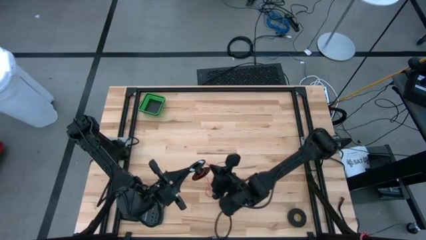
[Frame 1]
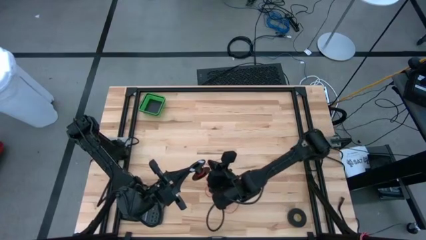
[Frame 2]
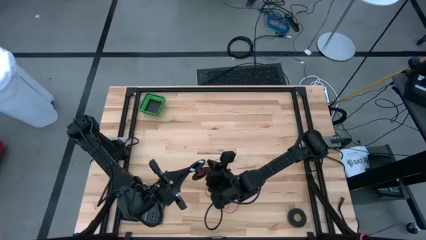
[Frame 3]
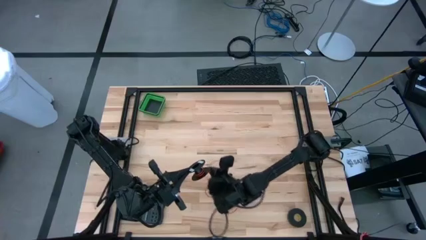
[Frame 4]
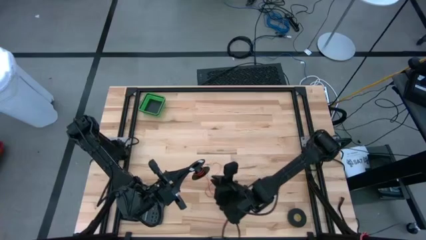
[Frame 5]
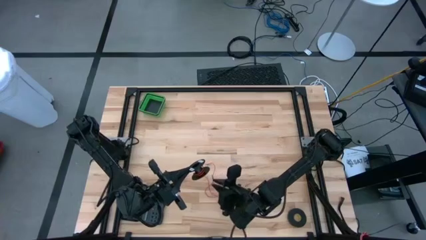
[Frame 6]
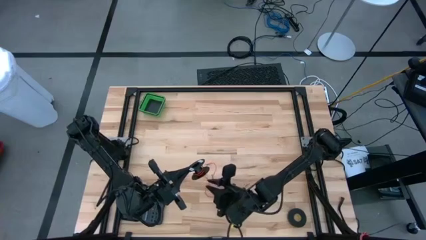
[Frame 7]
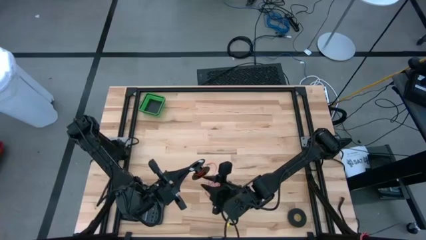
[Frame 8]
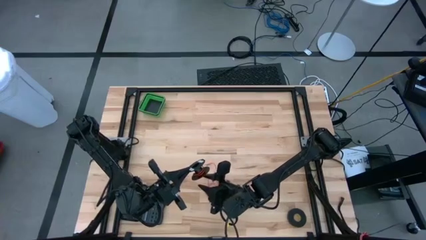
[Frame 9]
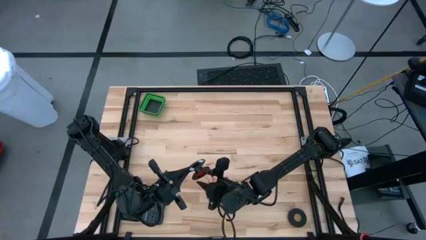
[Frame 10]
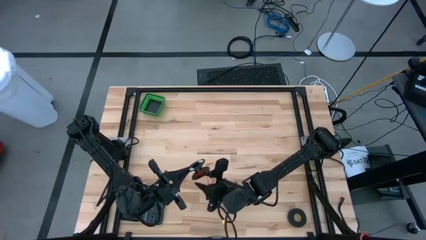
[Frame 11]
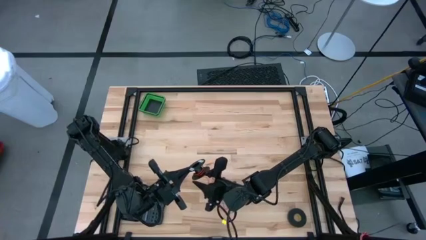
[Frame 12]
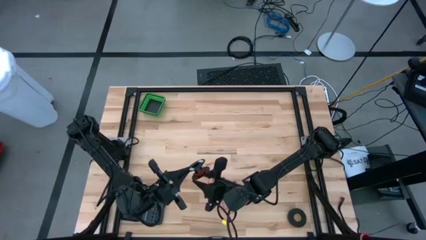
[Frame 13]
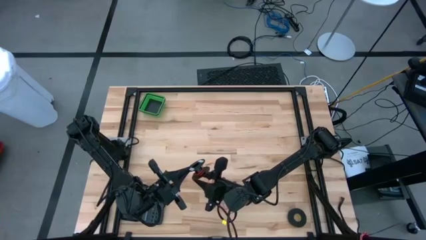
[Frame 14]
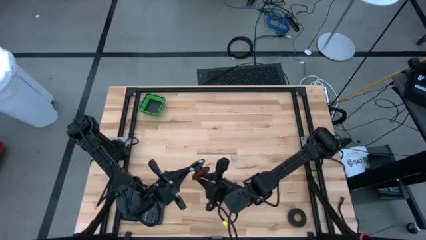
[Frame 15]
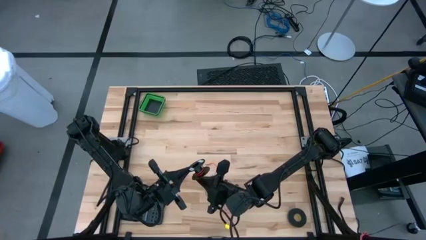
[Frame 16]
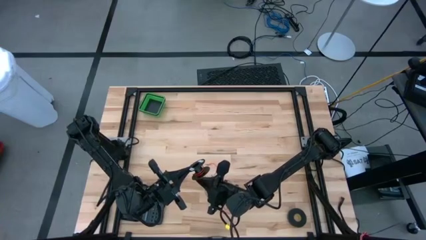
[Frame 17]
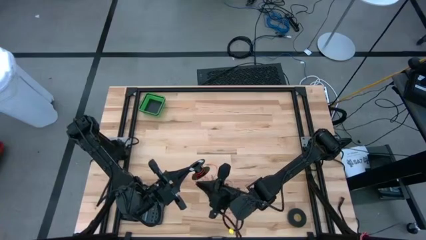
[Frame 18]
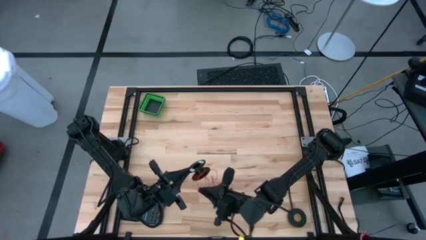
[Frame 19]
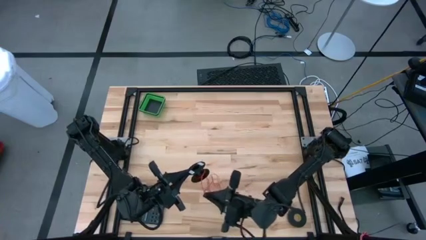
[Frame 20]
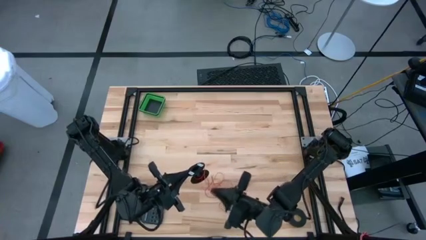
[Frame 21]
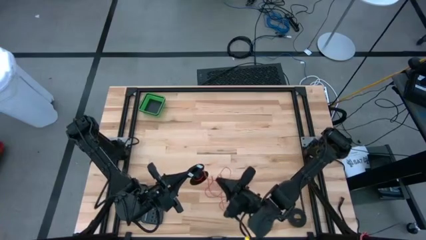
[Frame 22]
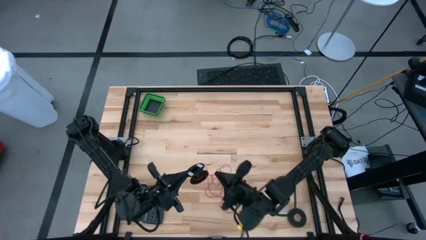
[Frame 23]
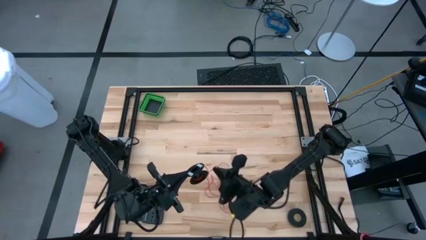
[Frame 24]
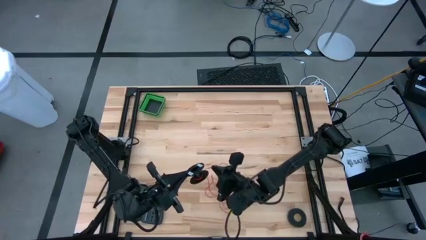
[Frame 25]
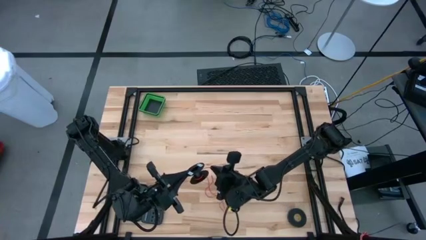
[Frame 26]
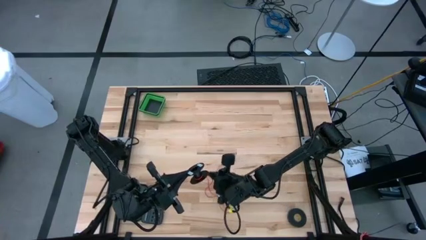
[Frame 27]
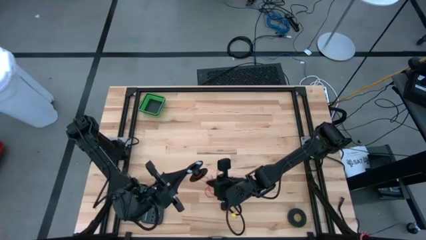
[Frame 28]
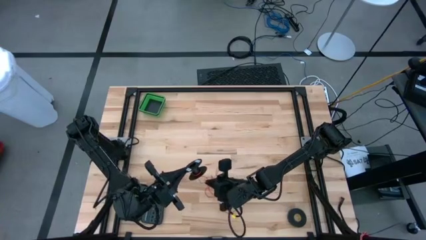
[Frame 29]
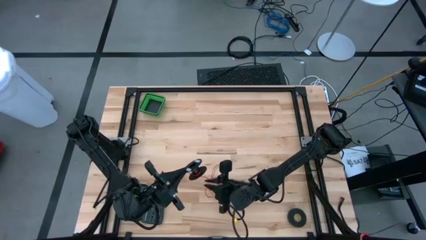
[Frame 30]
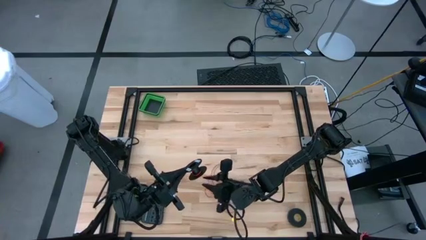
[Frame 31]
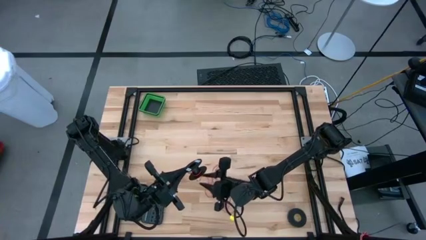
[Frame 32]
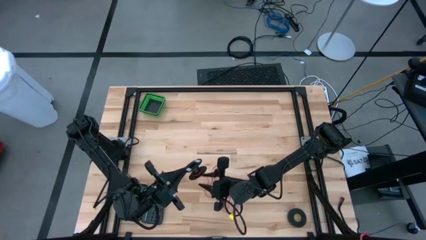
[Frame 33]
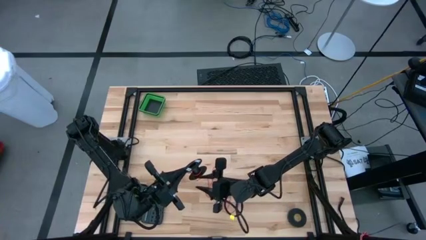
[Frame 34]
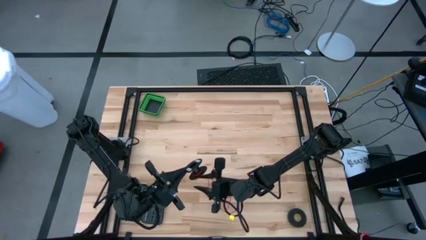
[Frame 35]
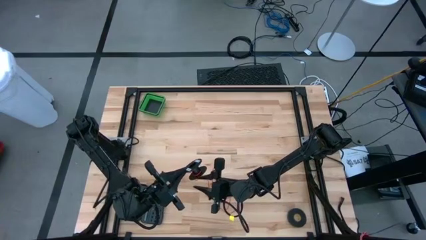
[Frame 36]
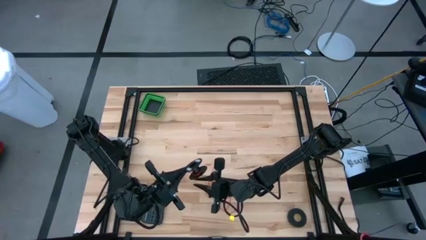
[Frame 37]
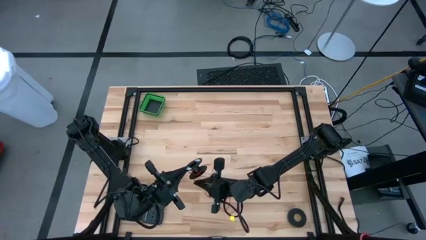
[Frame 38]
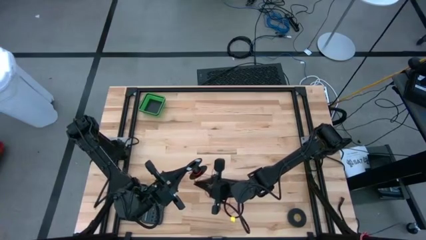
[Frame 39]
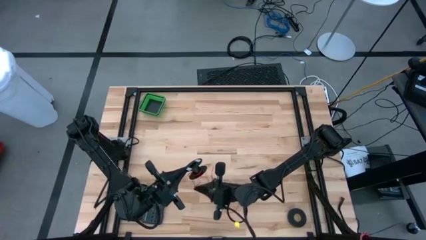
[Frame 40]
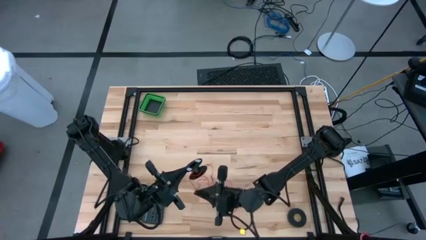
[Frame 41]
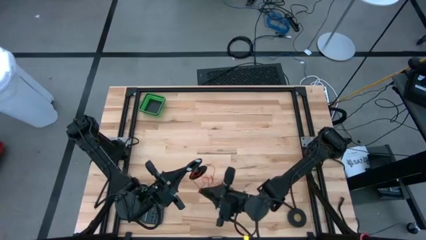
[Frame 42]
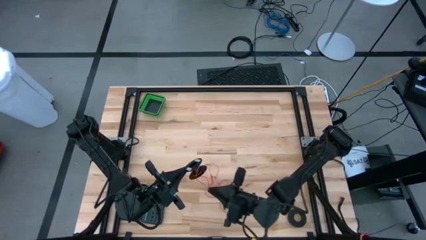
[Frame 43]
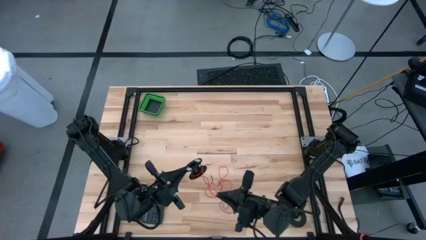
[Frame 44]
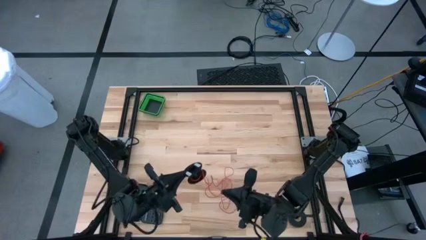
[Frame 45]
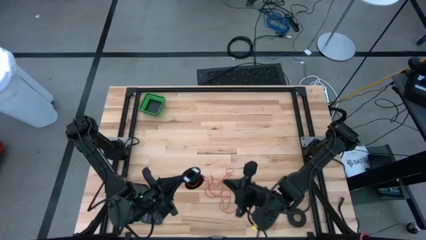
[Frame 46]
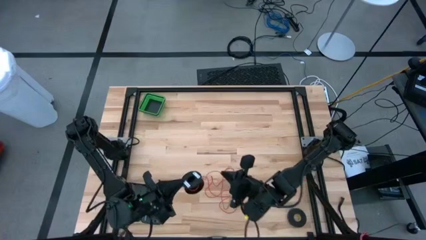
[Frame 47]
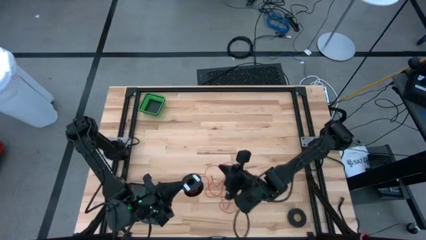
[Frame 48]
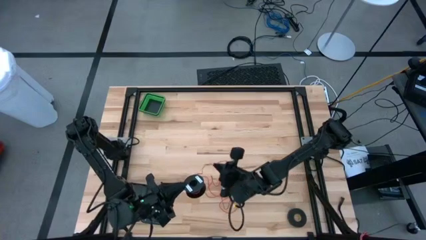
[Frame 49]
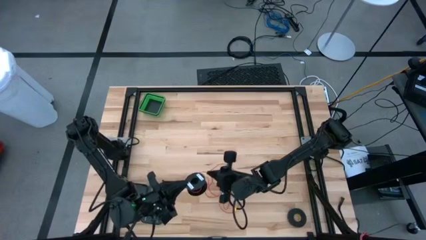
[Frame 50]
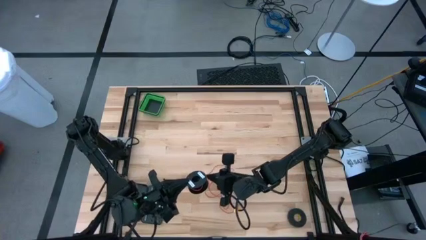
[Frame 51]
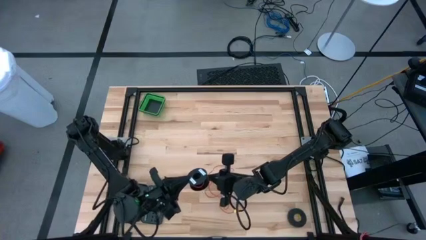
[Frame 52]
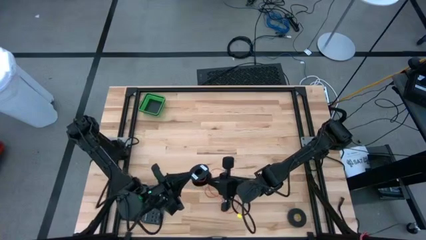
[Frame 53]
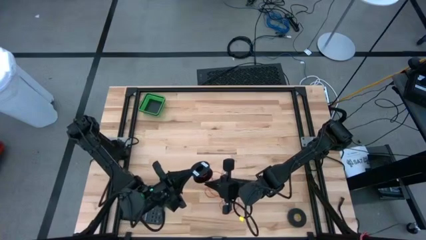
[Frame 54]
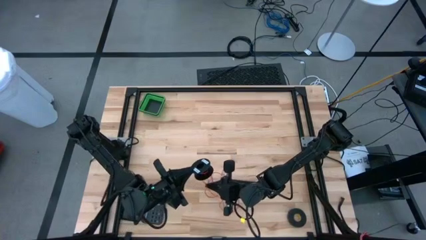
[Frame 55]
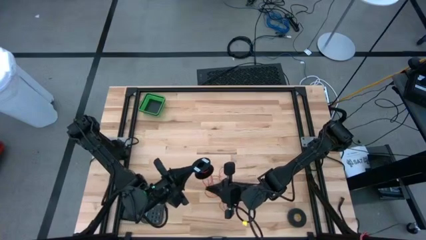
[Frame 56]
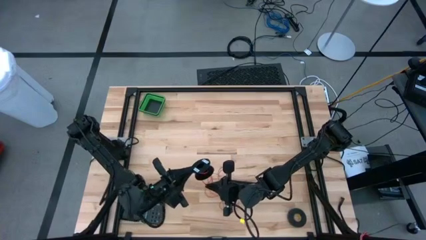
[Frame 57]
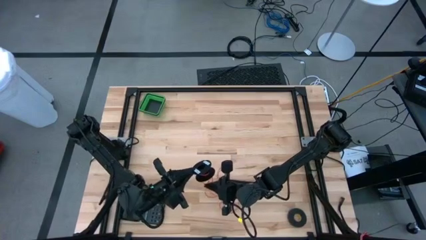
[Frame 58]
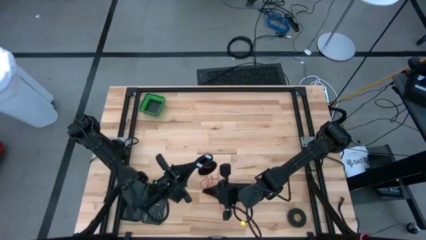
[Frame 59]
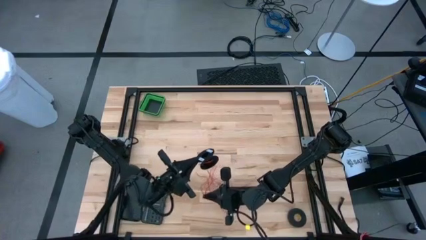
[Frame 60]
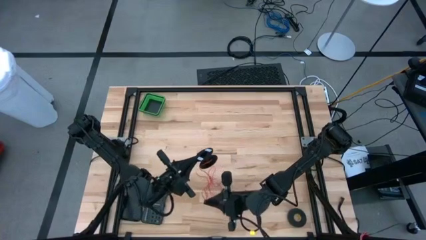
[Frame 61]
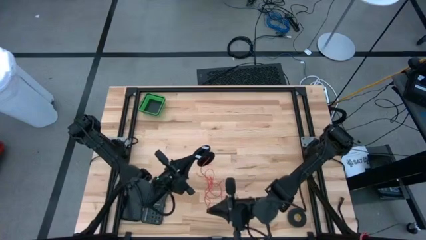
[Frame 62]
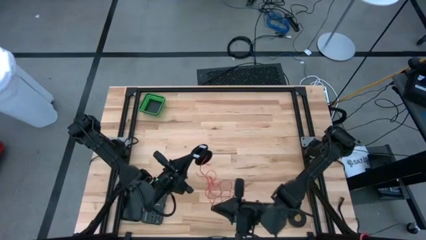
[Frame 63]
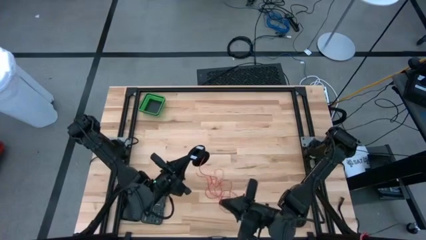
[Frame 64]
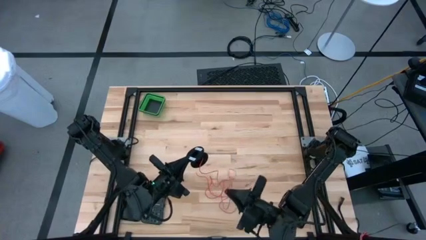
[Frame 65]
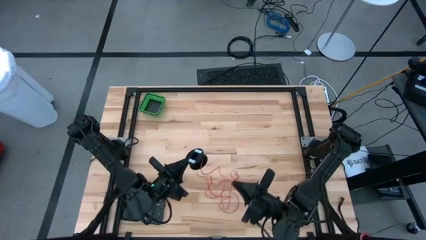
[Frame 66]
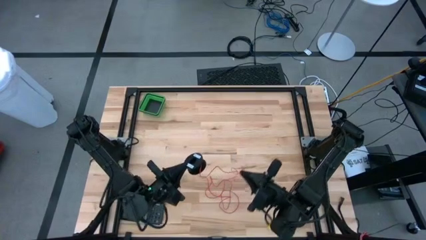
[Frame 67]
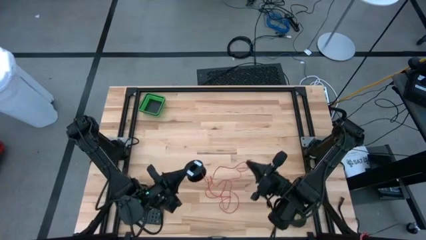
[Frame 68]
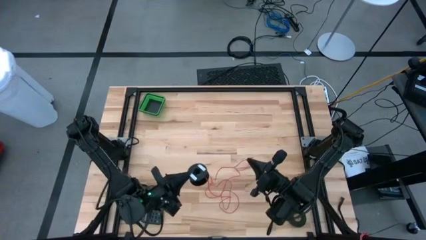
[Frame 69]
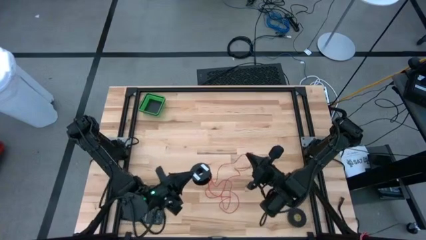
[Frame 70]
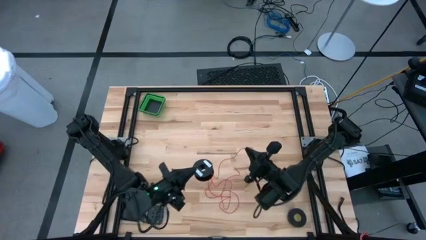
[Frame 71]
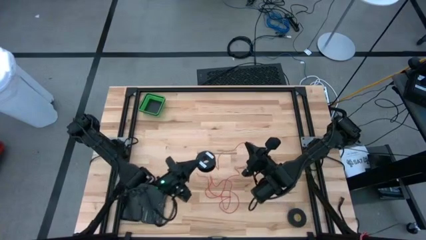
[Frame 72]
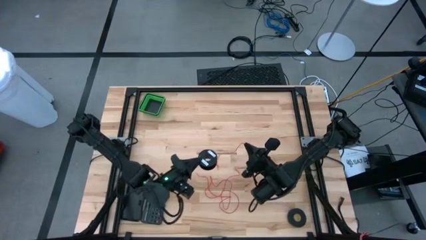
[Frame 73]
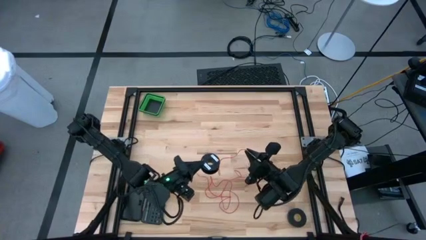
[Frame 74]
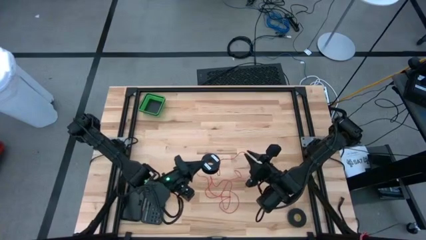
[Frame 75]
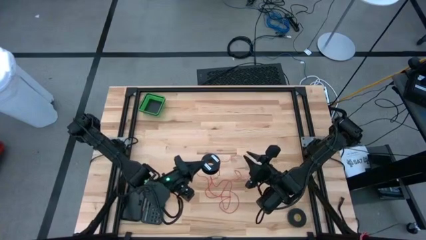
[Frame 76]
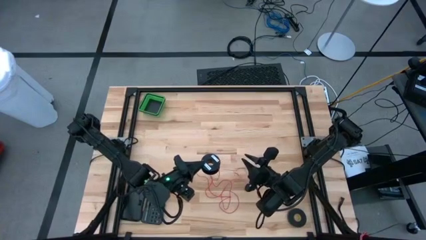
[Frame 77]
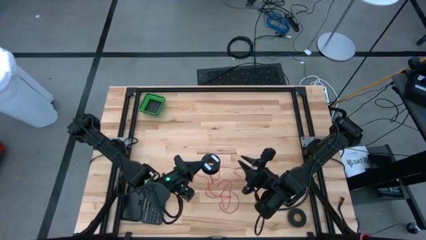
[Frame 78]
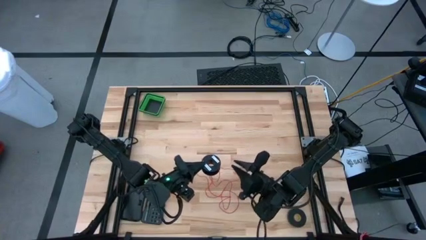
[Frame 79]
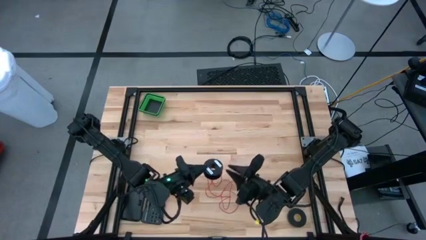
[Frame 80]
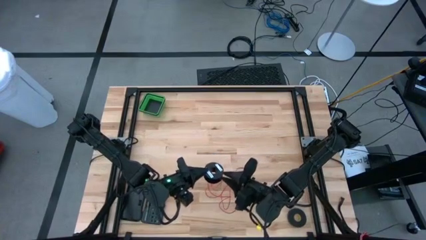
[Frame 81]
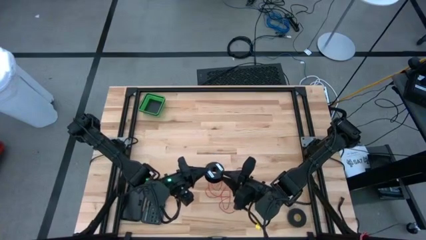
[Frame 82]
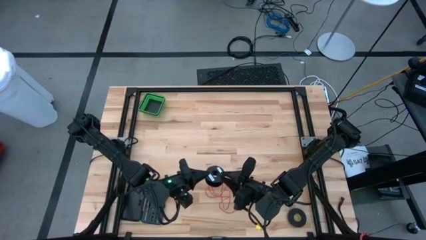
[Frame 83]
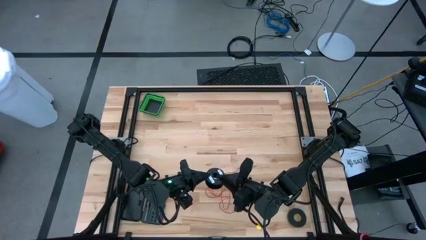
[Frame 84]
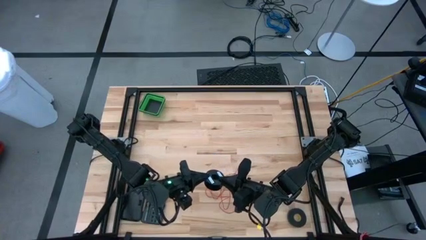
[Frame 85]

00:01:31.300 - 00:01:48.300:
Task: Coil cords
Uncoil the red wire from the spool
